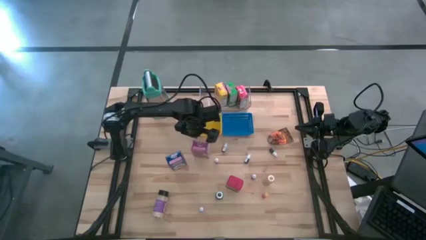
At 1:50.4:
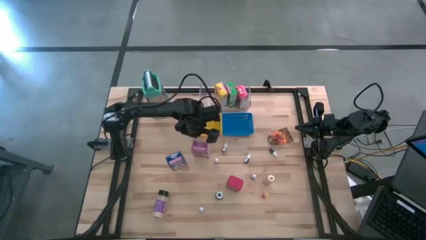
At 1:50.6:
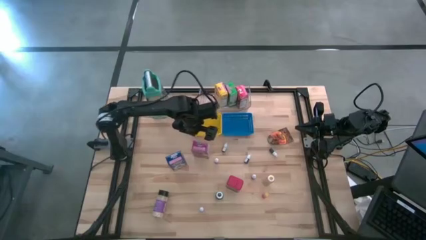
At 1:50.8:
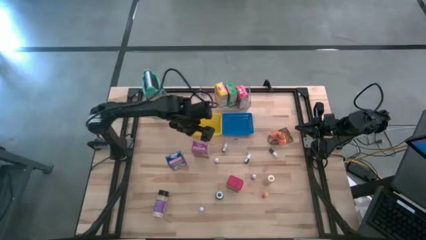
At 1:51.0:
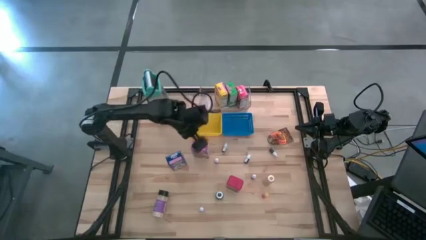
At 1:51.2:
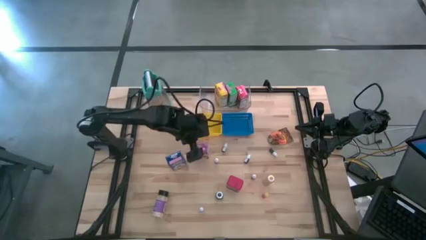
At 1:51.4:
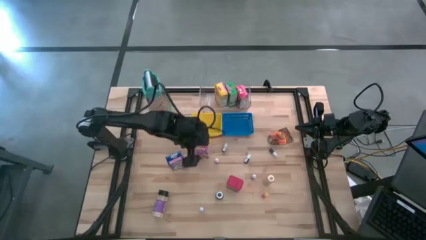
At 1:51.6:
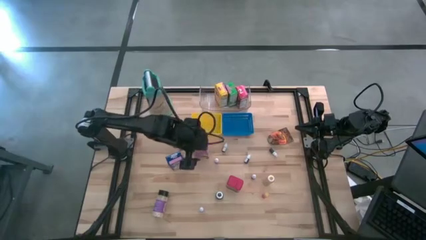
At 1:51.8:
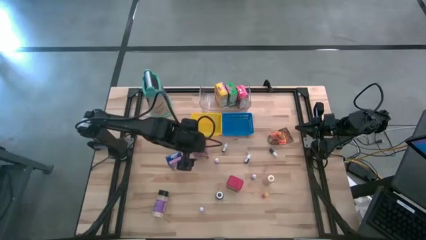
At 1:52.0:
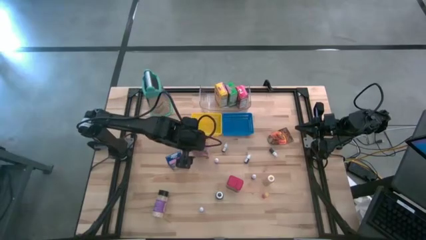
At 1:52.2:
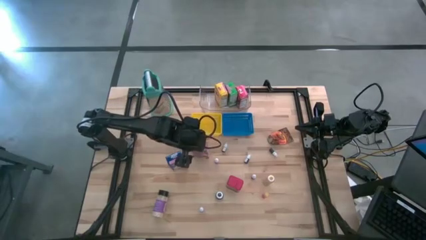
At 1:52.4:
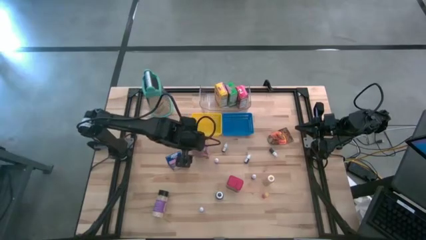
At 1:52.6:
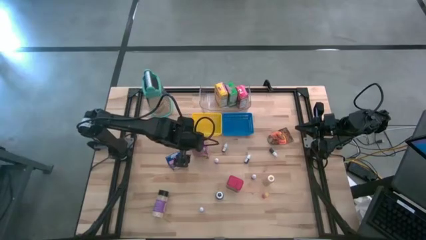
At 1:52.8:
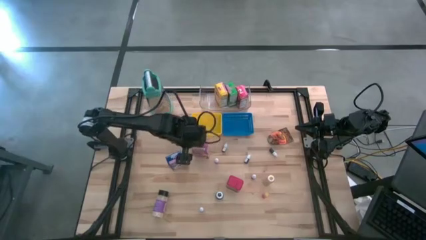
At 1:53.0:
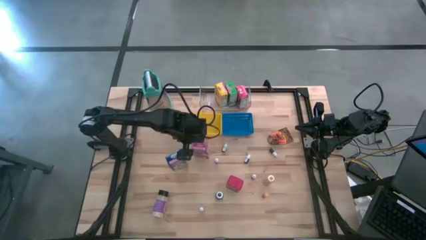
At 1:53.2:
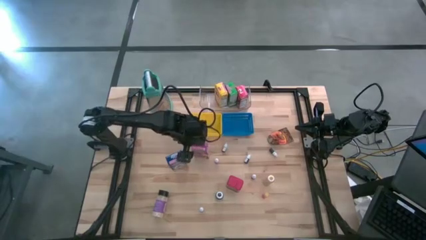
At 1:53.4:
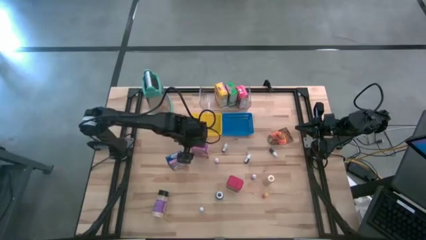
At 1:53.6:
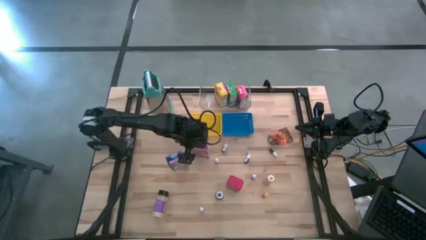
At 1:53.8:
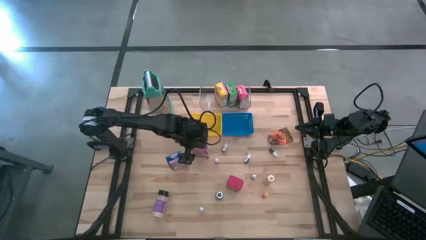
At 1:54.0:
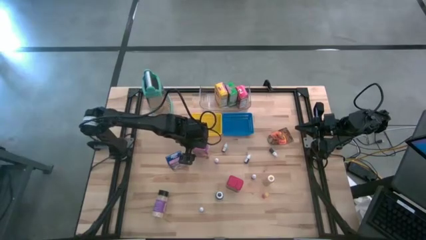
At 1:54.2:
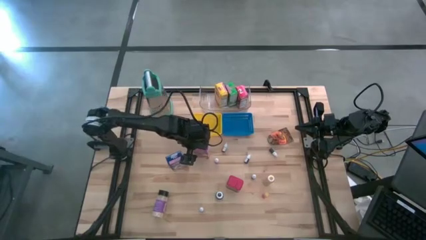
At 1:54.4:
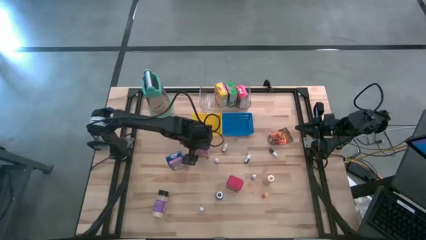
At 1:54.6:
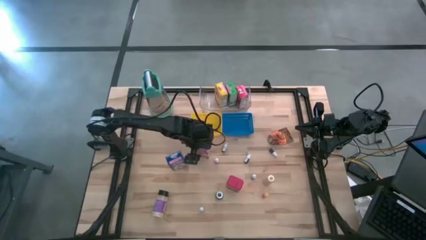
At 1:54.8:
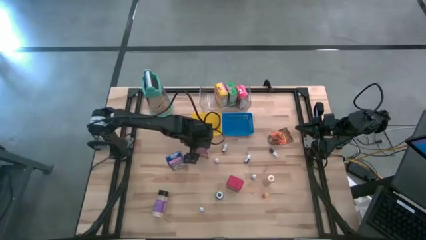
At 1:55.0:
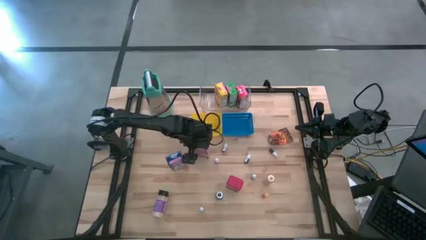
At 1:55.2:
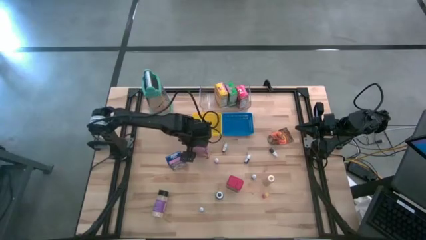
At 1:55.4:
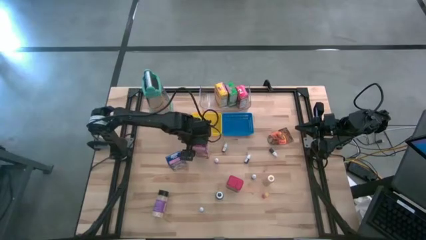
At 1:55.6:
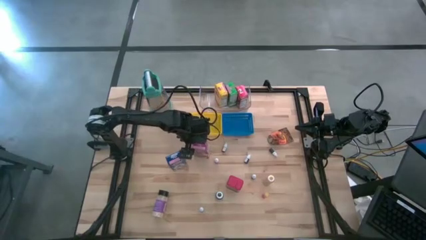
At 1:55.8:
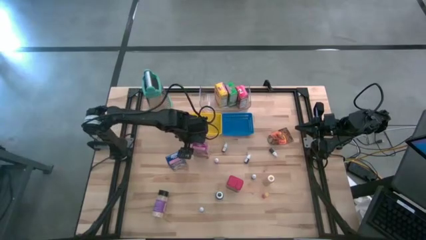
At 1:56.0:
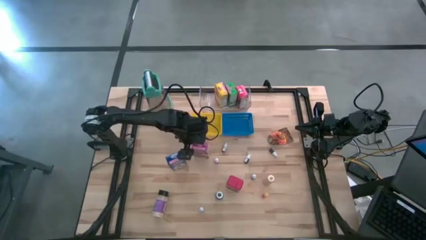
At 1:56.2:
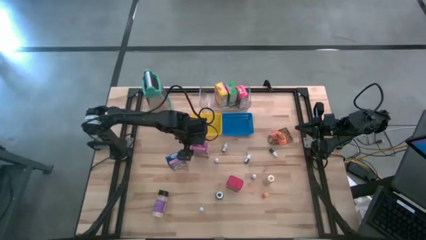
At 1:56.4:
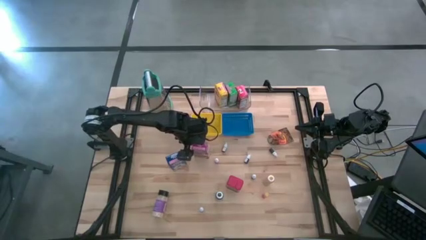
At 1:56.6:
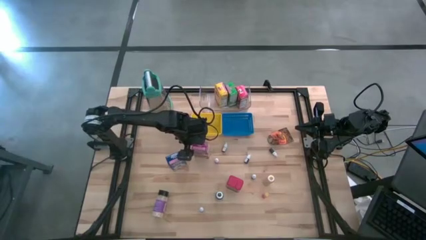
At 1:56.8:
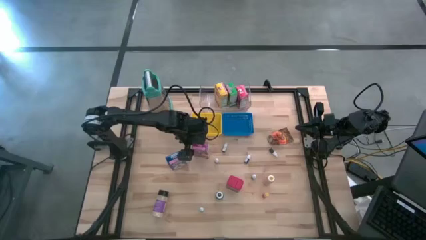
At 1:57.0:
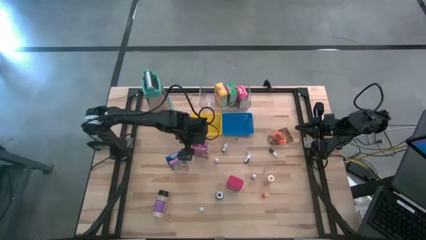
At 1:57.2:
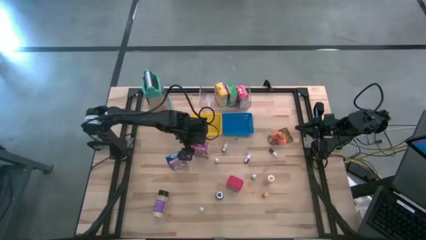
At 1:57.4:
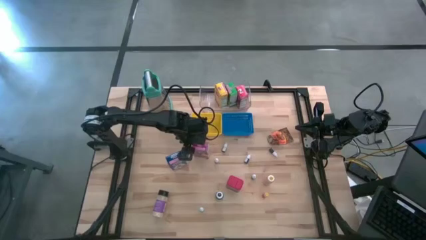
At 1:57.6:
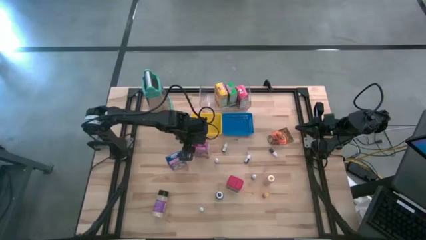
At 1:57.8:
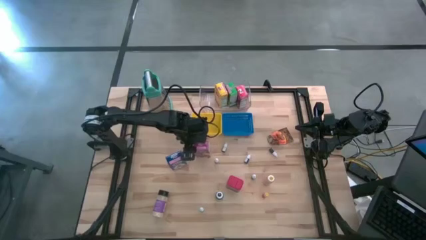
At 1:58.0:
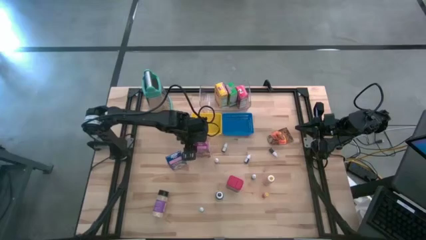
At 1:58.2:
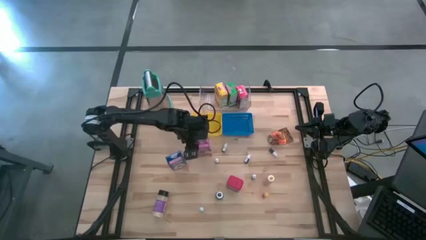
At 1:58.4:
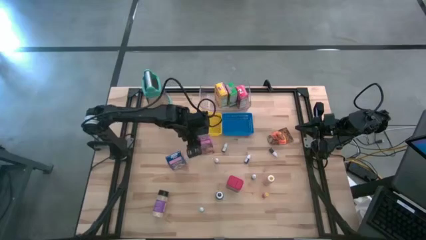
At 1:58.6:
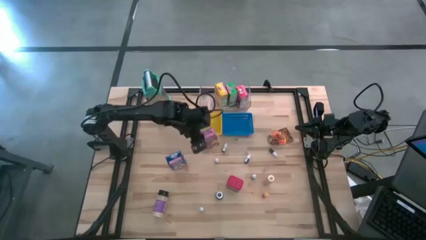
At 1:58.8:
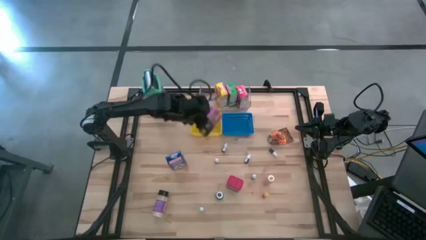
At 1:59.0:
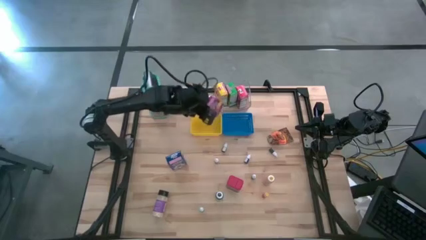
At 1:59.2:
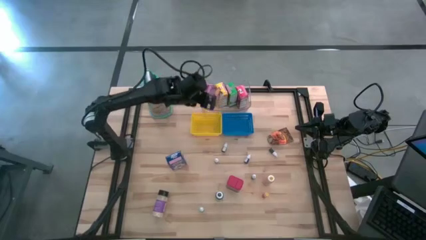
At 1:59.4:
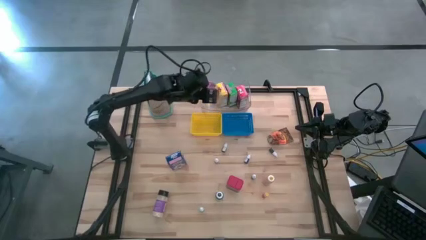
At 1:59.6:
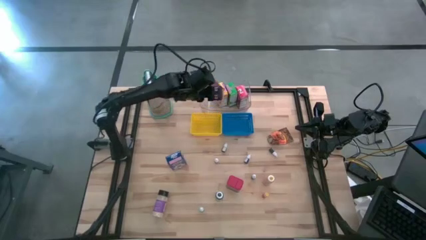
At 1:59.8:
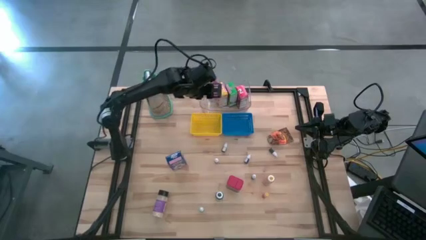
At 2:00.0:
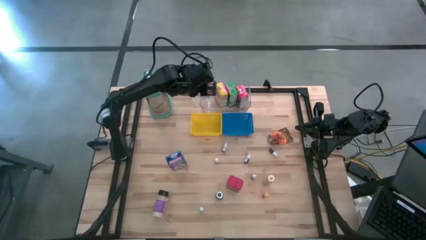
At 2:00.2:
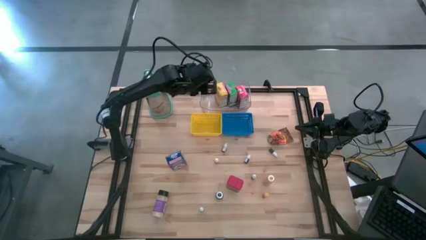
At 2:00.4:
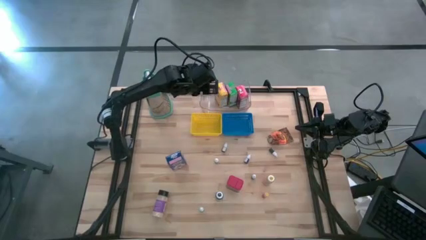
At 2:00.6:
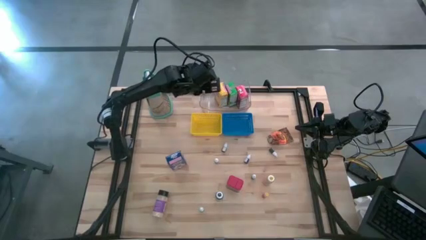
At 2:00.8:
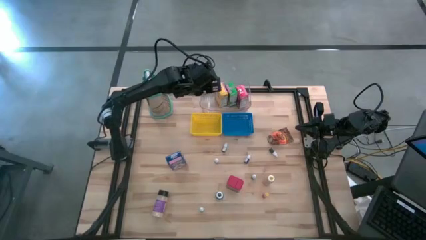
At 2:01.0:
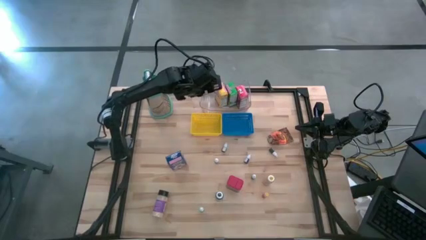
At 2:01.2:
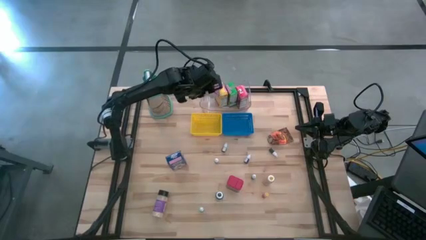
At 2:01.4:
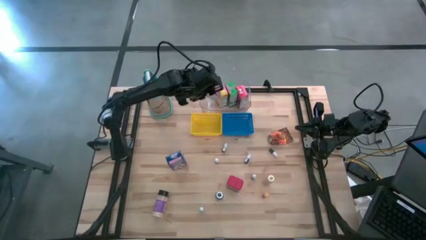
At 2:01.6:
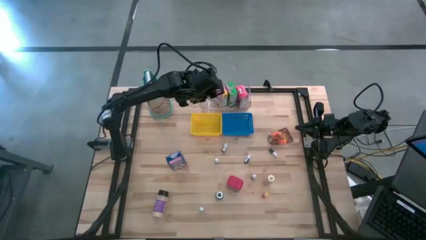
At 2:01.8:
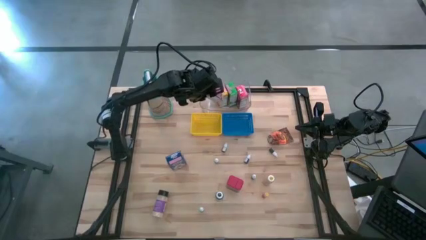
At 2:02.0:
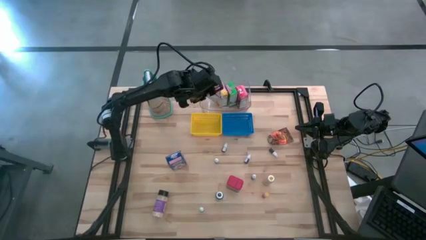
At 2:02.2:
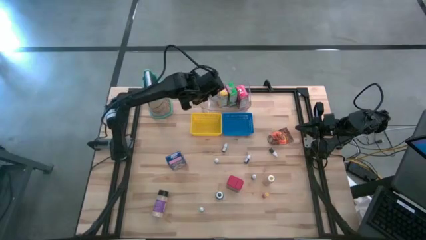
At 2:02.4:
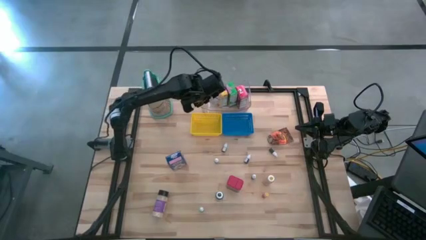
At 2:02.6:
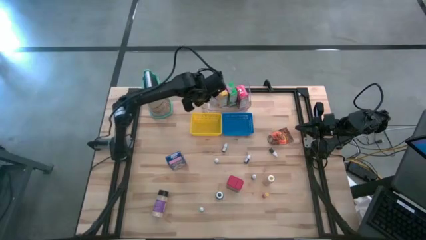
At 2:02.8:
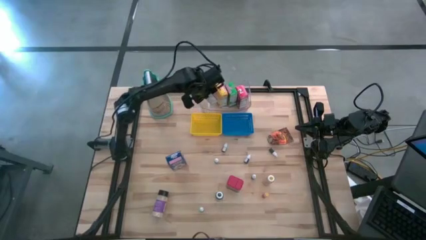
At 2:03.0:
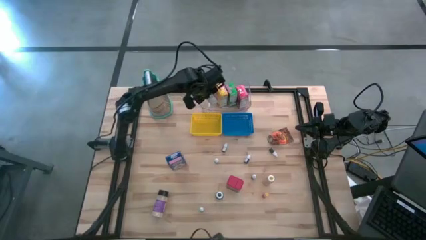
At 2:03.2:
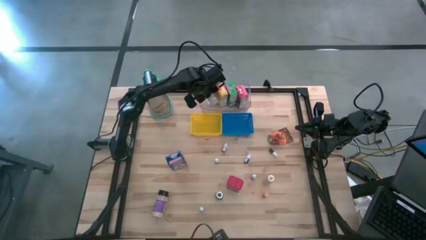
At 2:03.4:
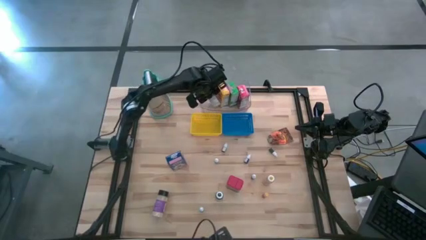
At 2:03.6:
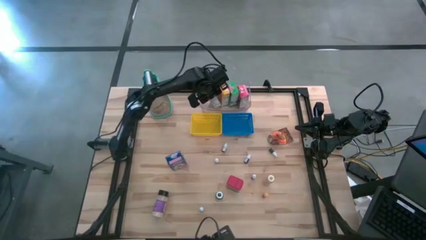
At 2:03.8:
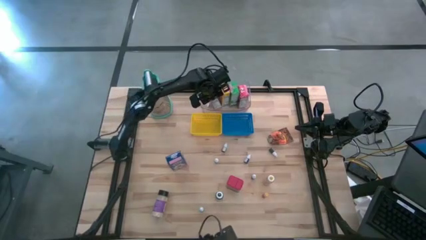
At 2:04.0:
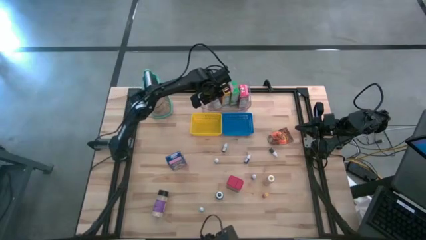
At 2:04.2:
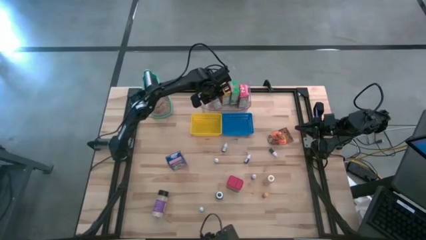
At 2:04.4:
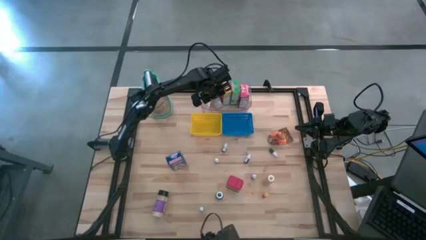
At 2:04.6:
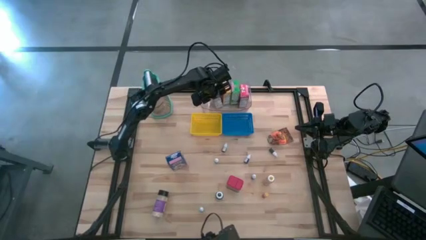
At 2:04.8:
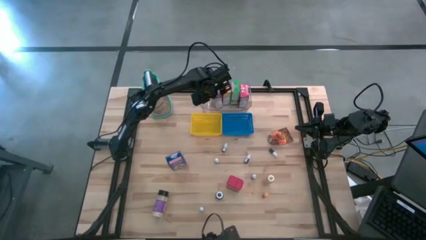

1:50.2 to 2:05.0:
Task: Pick & Place Kitchen Items
Put the violet cereal box into the transparent bin
